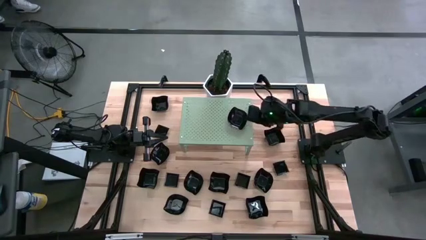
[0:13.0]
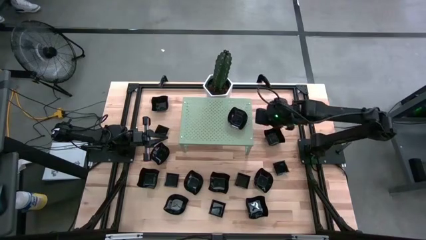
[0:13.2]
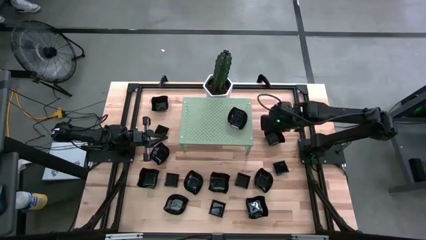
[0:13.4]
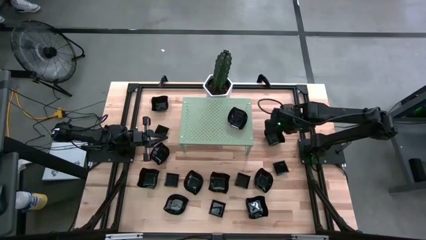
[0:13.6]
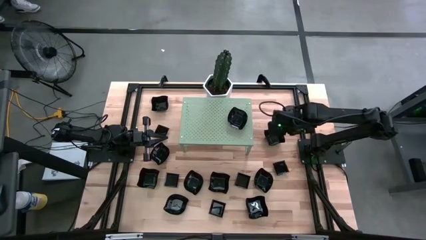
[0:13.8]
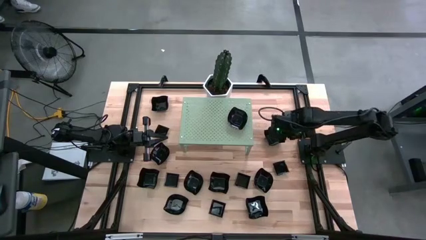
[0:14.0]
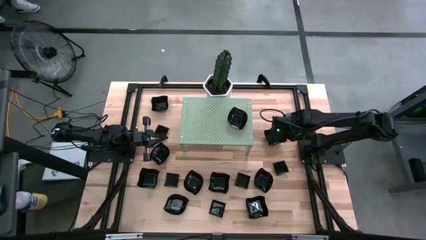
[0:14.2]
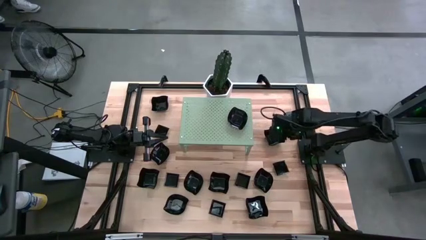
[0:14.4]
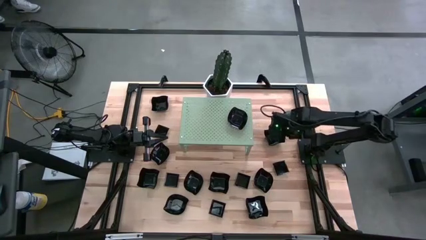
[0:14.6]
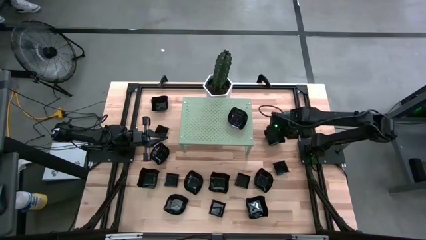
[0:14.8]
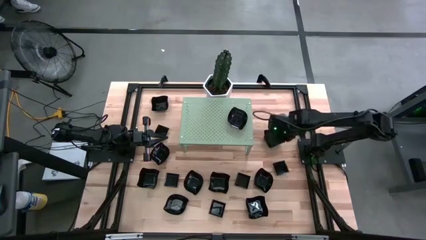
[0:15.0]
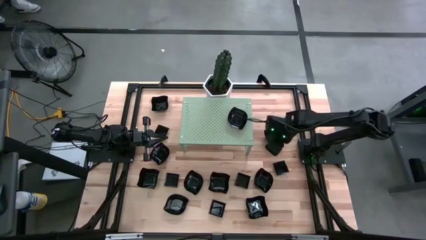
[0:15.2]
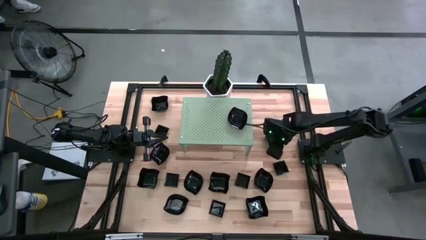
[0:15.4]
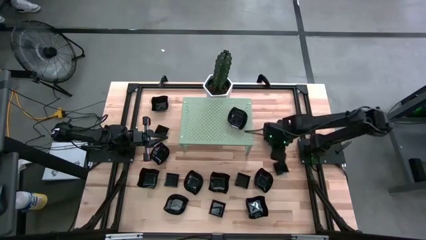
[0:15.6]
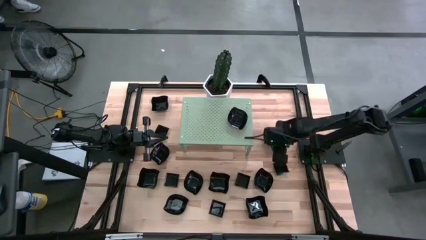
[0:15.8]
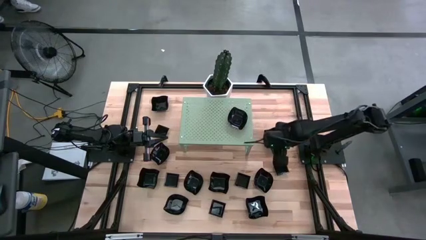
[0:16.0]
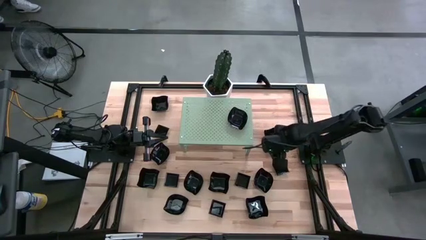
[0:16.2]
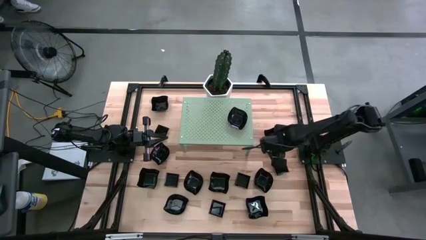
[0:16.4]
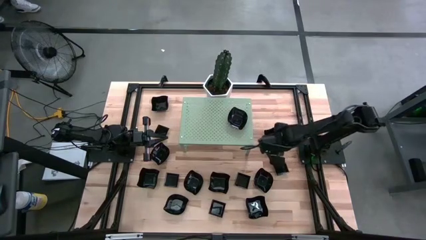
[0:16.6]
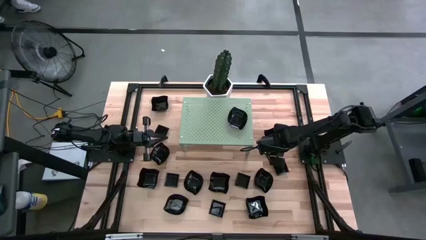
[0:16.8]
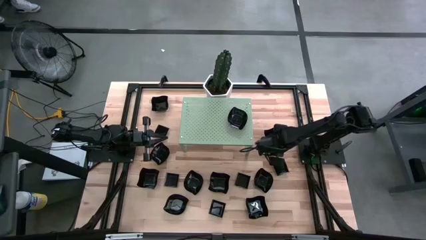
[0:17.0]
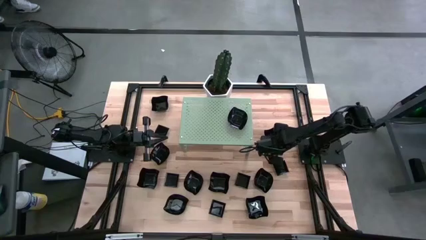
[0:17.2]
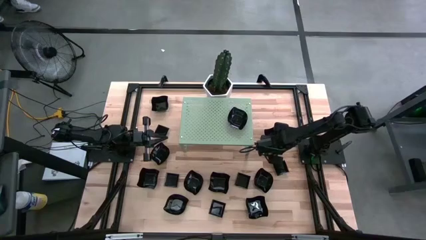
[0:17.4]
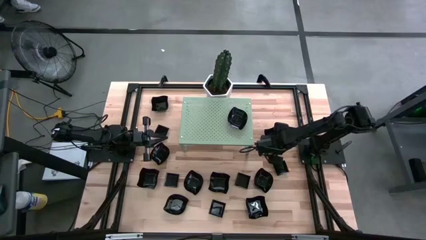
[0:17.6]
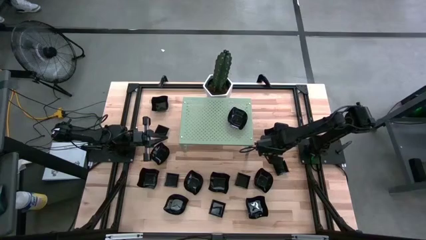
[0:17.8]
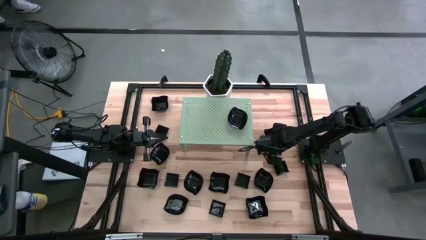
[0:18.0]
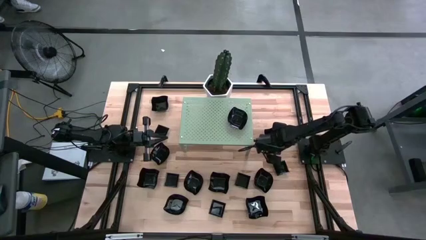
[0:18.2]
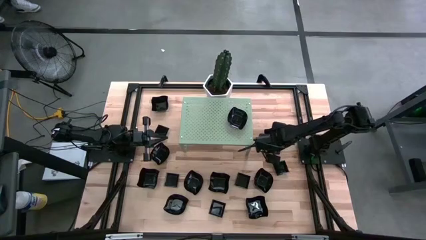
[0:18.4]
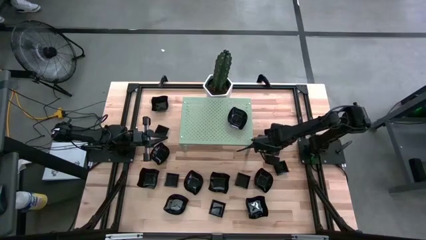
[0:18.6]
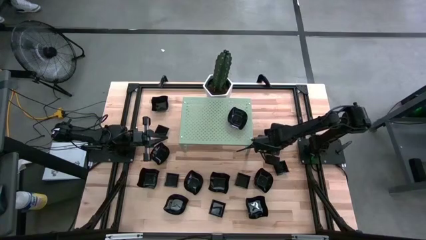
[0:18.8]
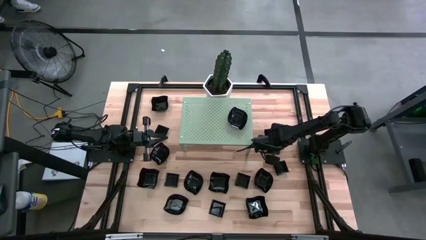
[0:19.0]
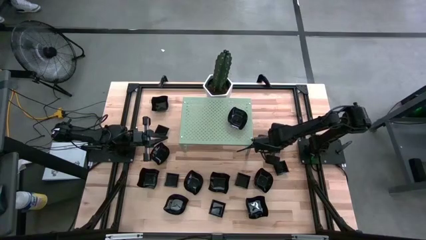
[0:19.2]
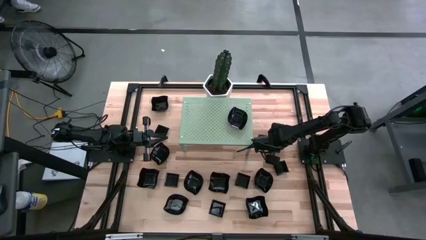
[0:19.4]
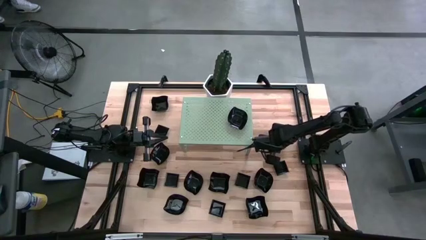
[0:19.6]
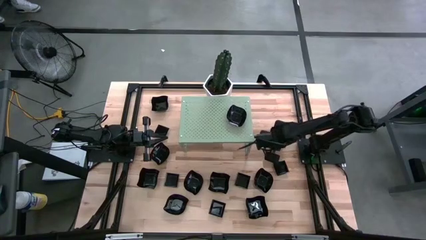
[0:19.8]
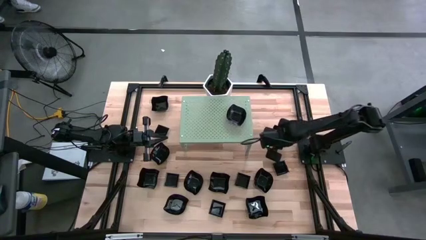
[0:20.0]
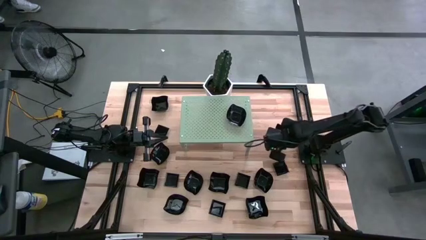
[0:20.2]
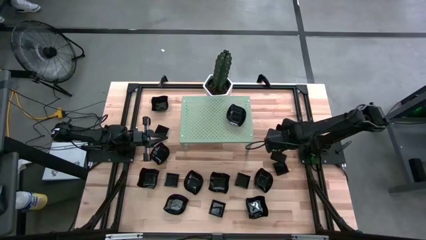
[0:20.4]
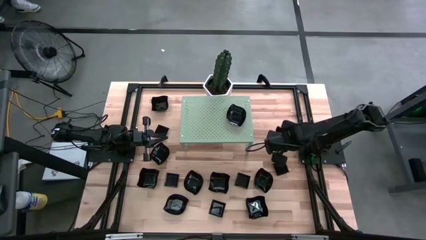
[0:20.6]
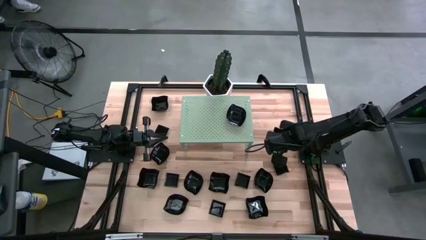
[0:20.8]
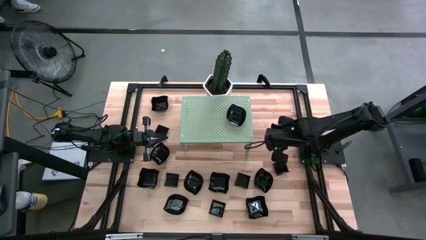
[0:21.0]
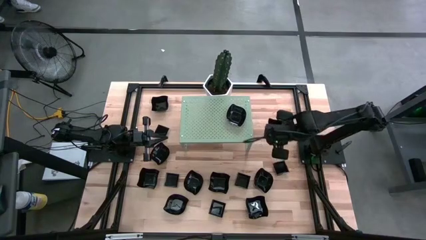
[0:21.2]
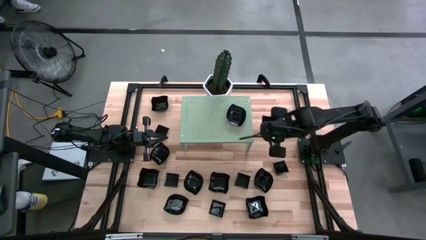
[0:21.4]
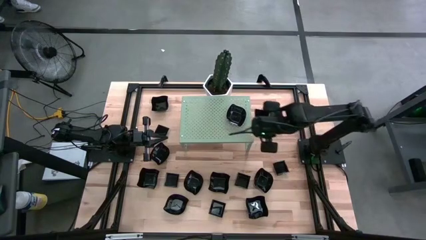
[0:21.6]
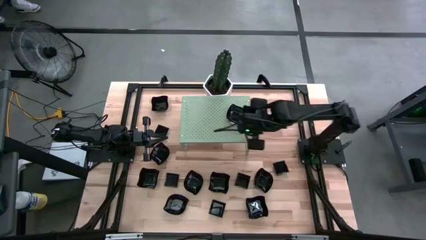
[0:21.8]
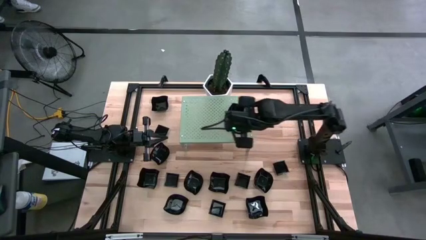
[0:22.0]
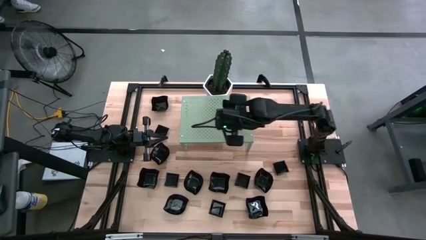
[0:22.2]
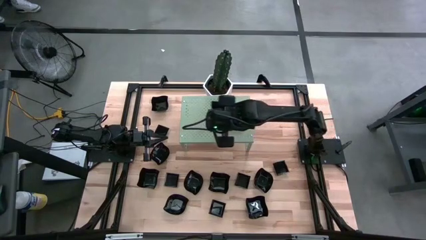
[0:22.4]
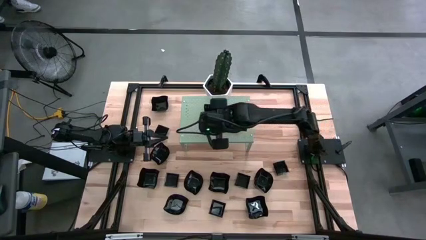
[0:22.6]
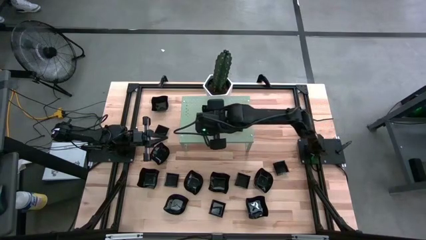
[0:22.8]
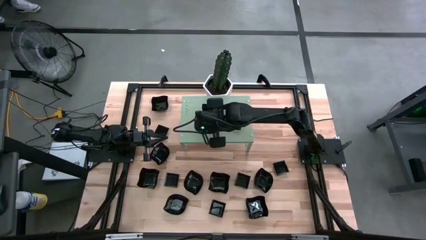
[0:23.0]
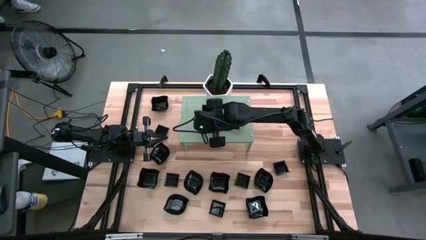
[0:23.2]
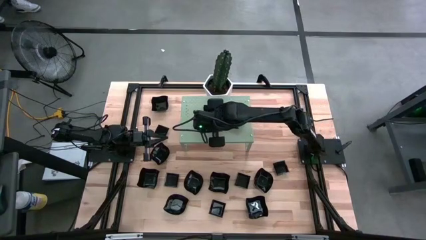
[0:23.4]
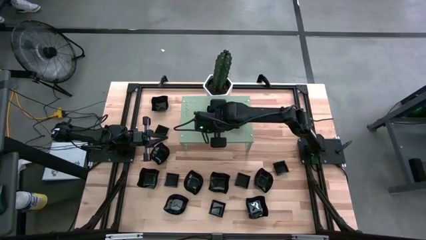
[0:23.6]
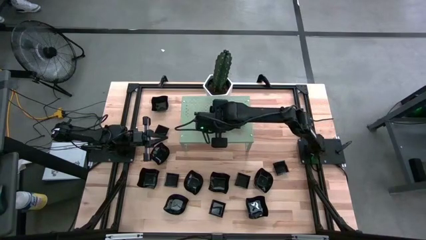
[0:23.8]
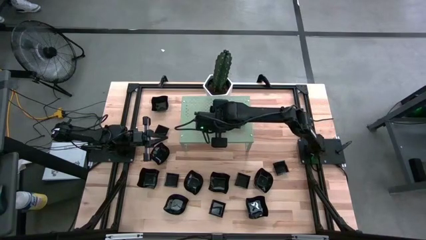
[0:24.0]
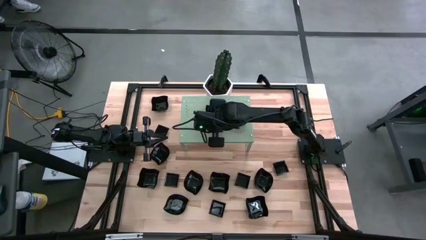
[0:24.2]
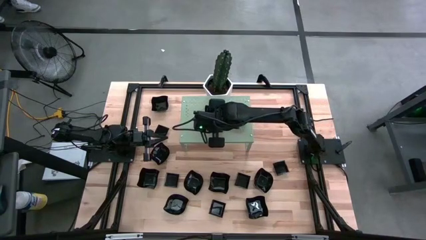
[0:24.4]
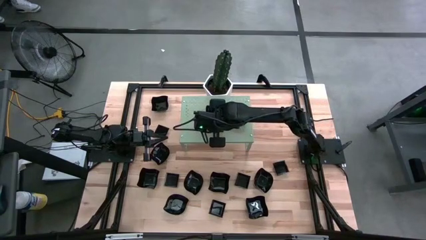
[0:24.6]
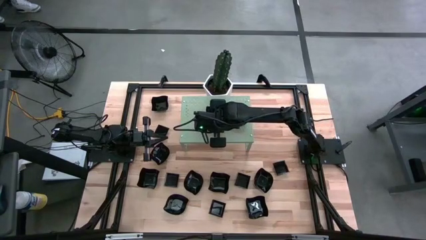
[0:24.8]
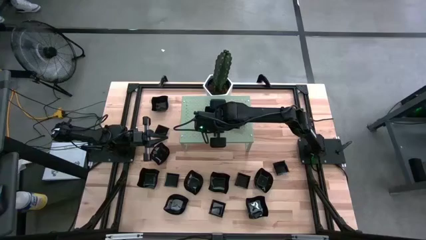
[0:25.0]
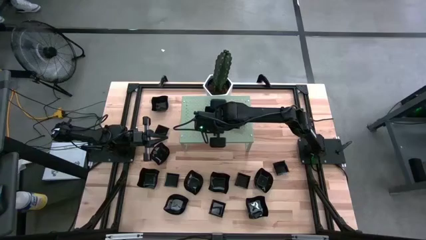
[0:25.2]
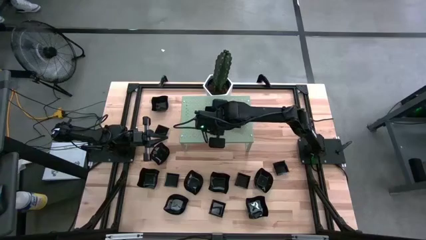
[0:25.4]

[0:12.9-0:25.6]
Task: Pick & Place Mini shaped plates
Put the distorted square plate on the shelf
